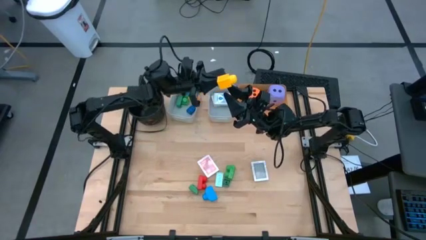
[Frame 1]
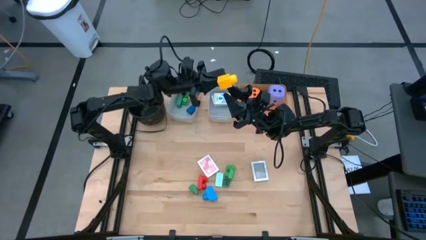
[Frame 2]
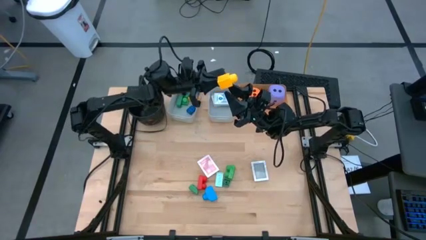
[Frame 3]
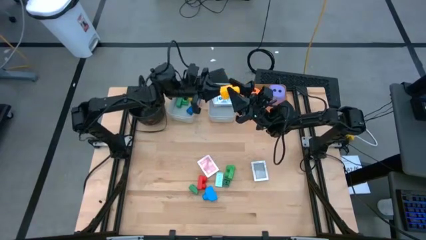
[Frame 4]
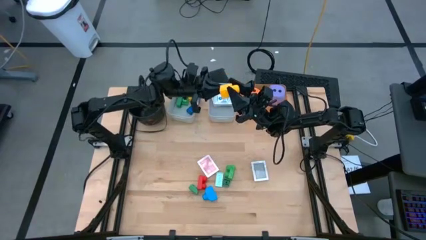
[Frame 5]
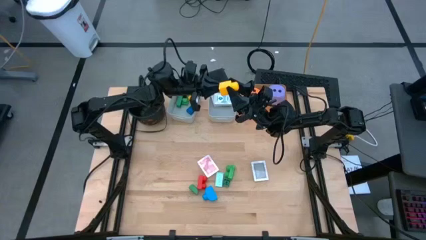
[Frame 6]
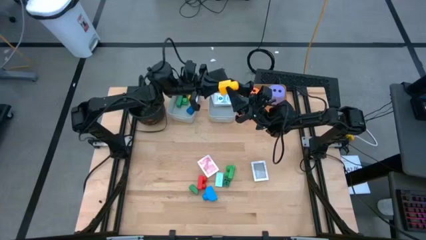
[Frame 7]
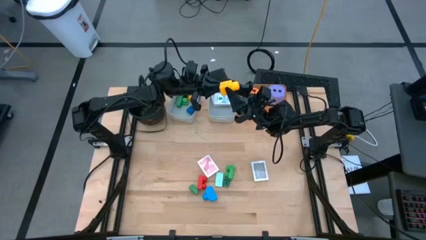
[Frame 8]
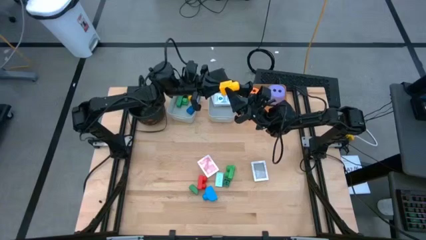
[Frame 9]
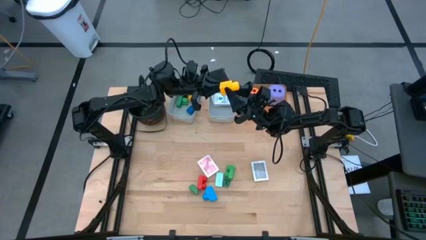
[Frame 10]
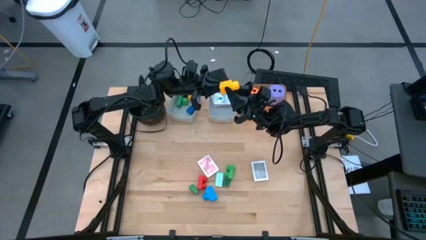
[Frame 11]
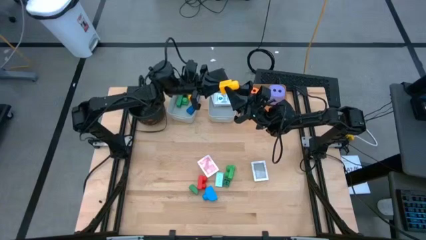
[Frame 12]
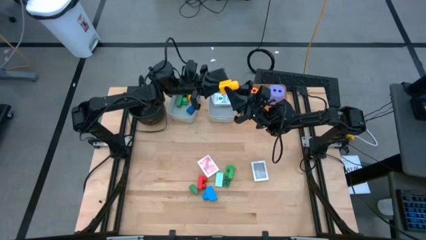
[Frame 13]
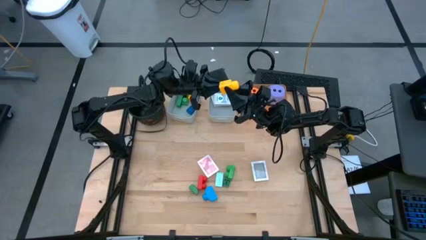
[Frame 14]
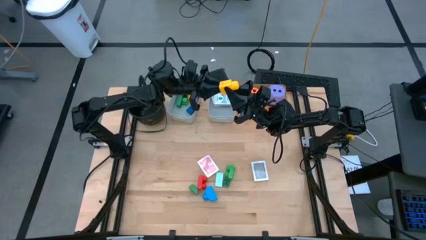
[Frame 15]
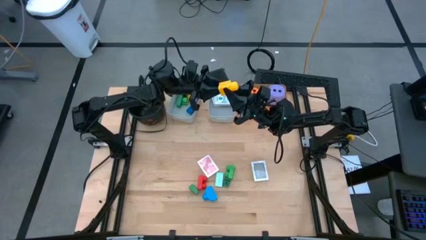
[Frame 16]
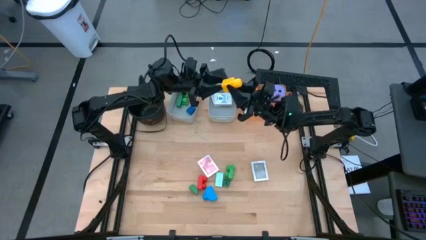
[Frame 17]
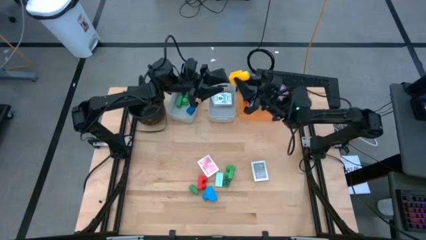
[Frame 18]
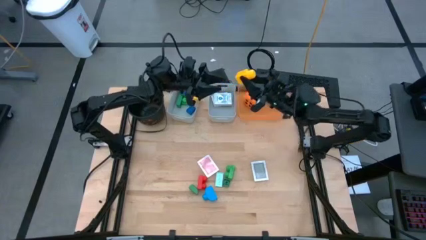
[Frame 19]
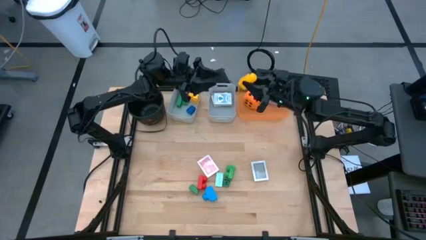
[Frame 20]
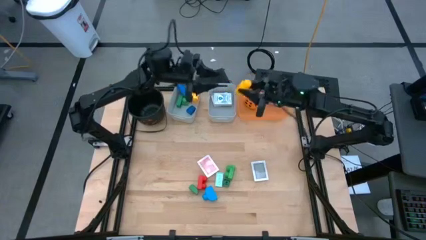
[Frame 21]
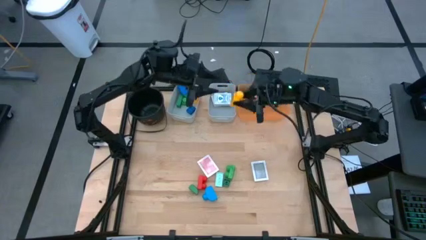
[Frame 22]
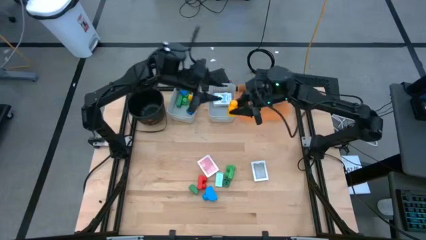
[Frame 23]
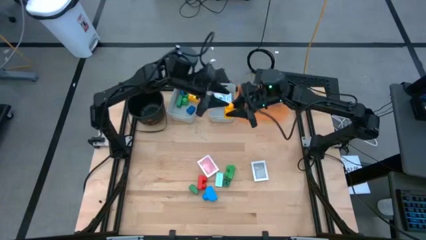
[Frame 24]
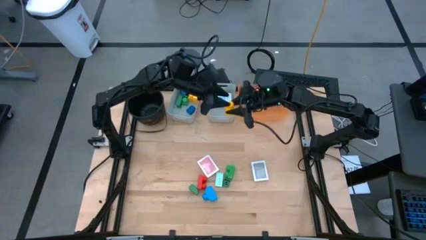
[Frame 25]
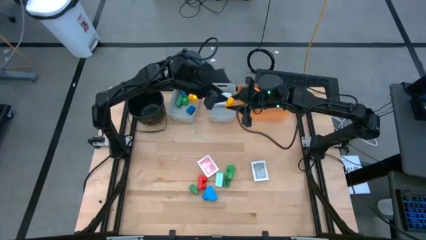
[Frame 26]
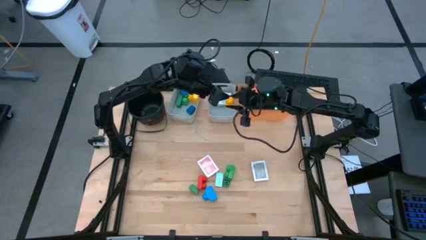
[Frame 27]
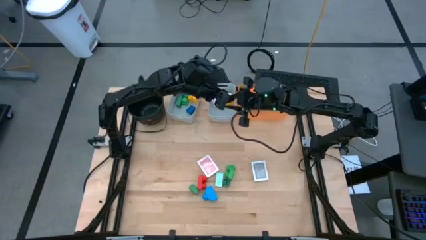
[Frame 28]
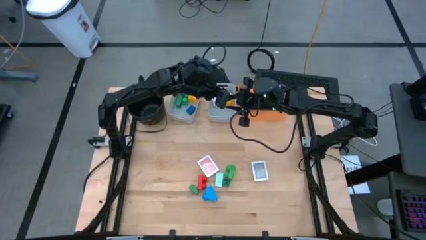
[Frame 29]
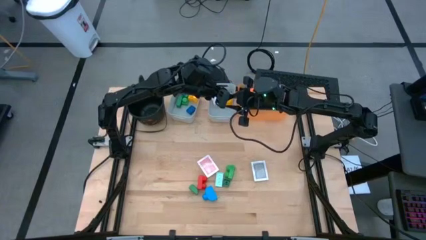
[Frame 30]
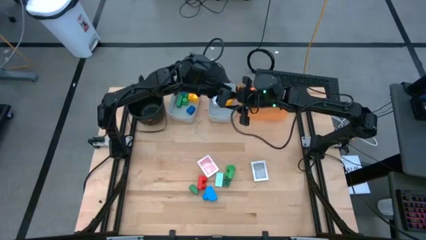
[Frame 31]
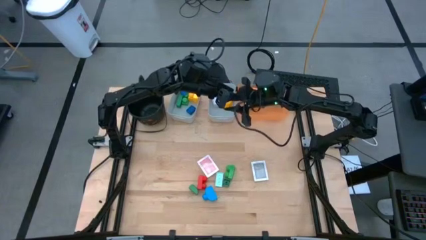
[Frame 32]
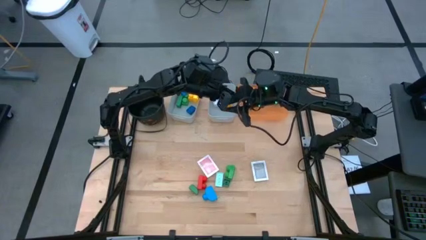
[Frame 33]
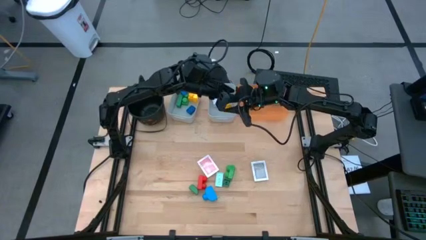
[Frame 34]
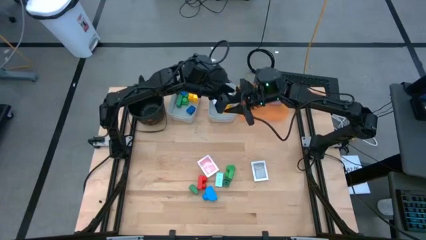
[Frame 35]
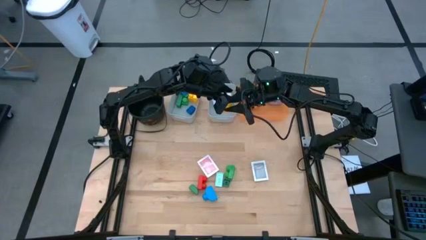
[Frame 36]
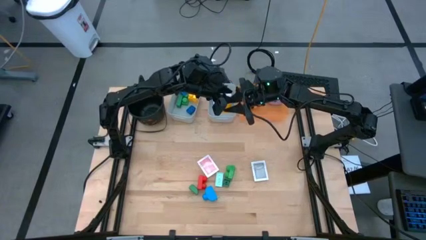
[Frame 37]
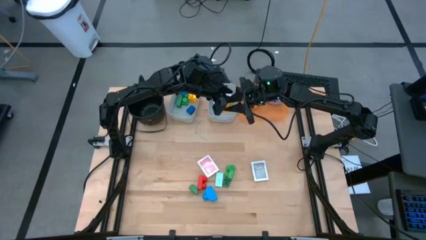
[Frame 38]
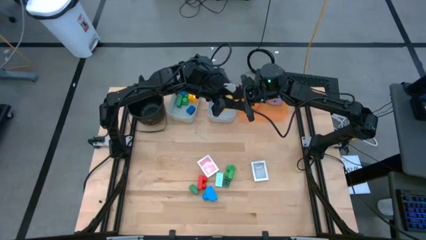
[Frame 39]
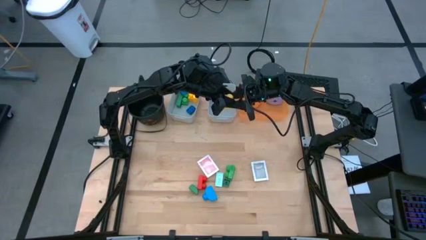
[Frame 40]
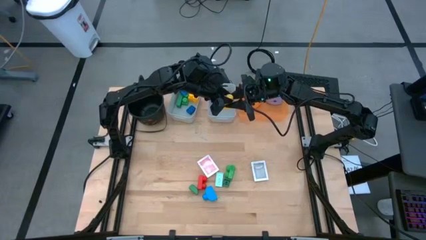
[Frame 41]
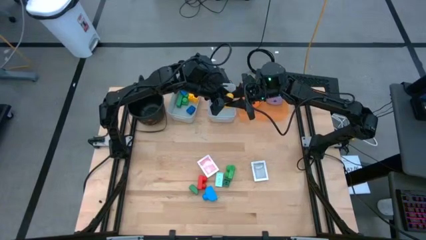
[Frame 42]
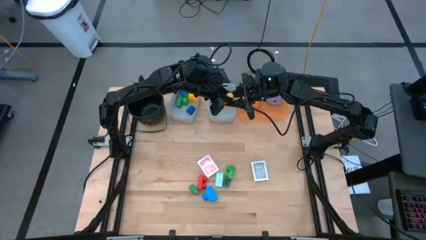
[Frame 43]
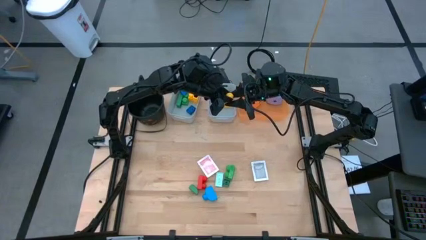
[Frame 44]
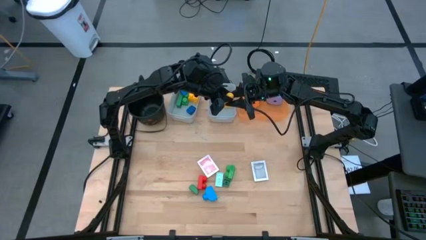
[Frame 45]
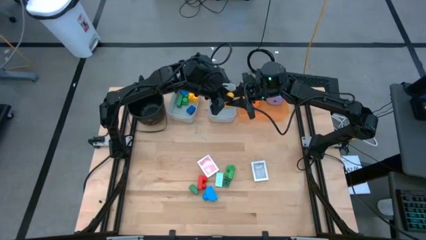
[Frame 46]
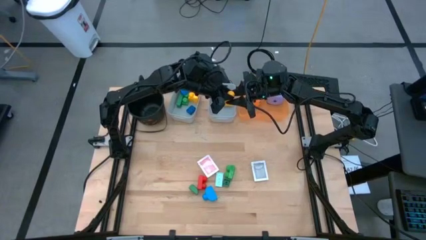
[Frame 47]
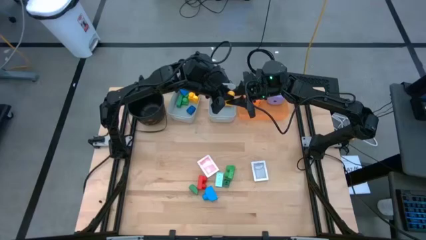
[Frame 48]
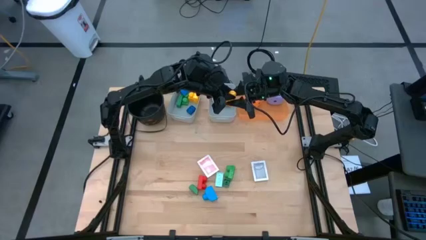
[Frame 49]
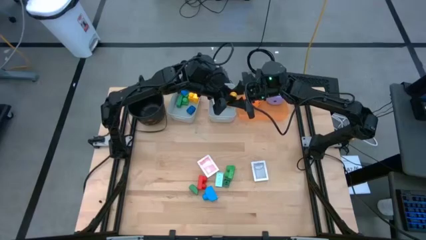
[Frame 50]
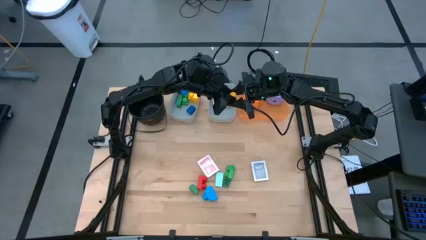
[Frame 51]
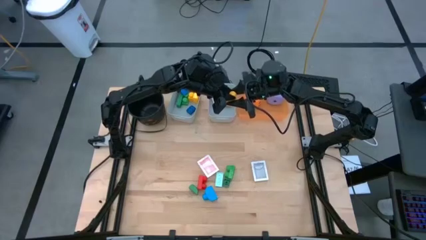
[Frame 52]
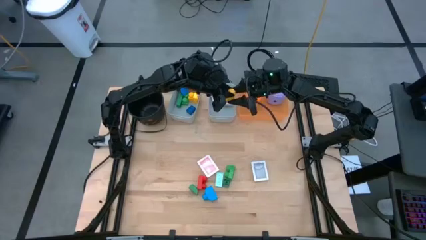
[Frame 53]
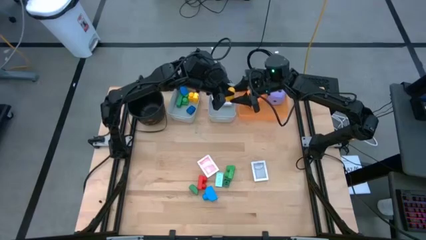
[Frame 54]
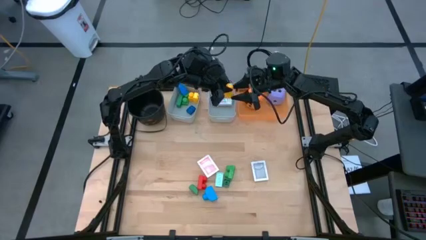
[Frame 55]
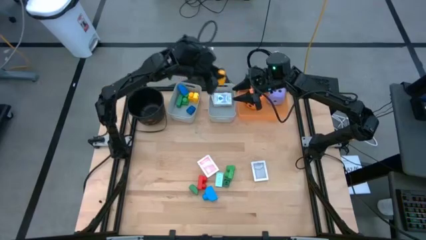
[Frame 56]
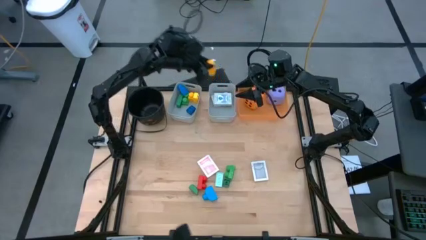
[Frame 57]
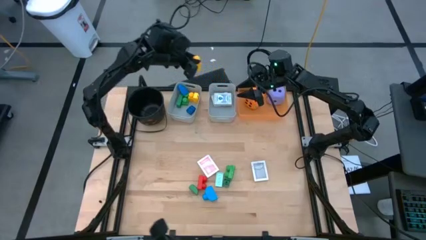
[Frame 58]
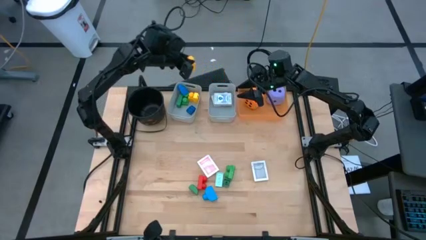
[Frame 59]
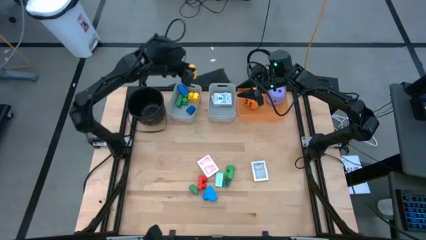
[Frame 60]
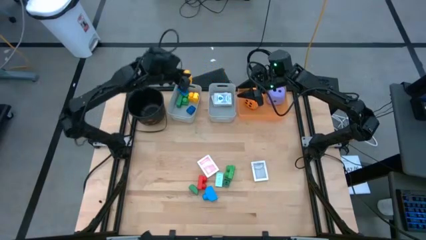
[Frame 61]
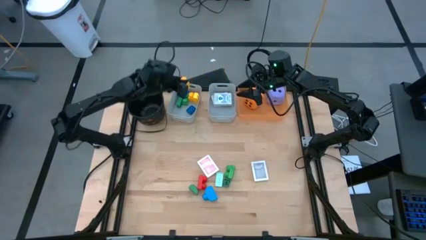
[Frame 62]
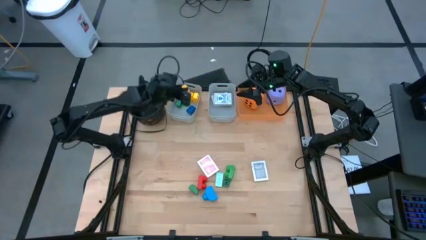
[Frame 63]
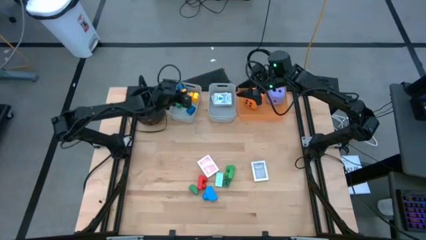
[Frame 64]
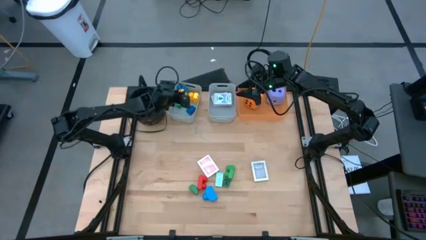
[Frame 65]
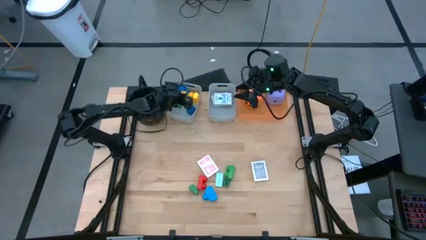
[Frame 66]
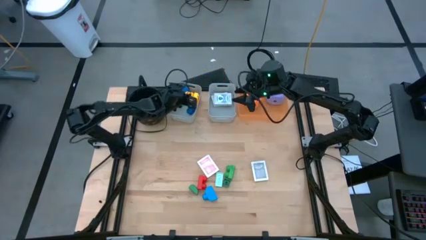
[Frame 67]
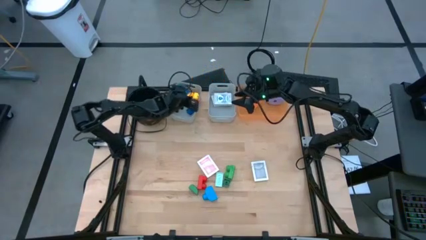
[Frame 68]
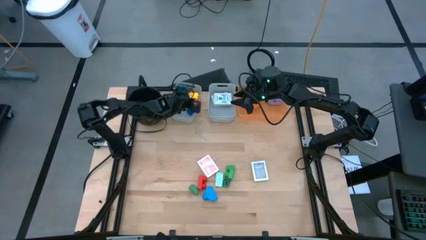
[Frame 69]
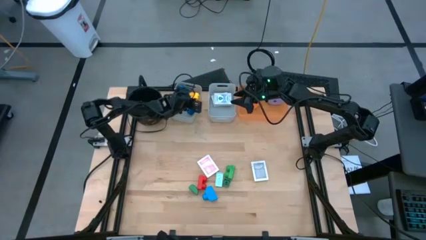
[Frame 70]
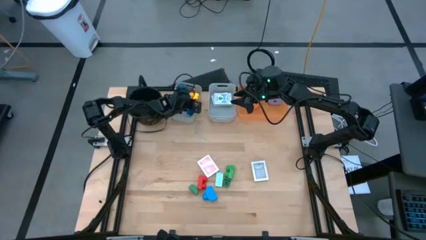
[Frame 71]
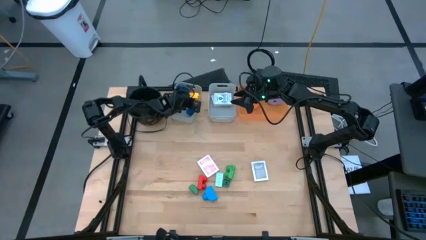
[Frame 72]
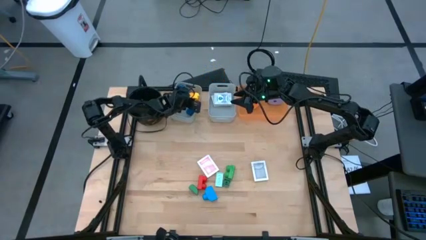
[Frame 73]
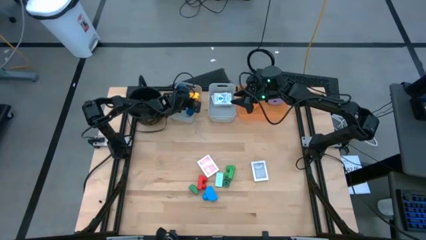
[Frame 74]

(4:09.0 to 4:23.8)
Task: Pick & Place Toys
Put the yellow game piece into the left gray bin
